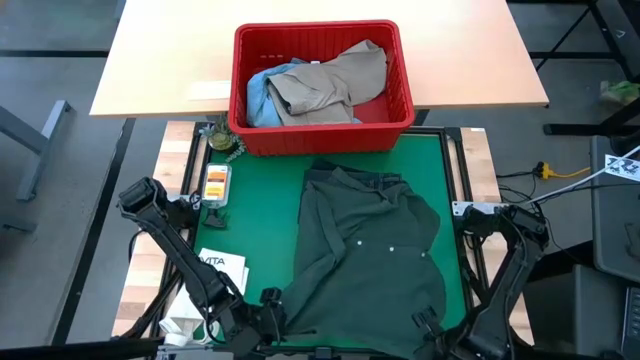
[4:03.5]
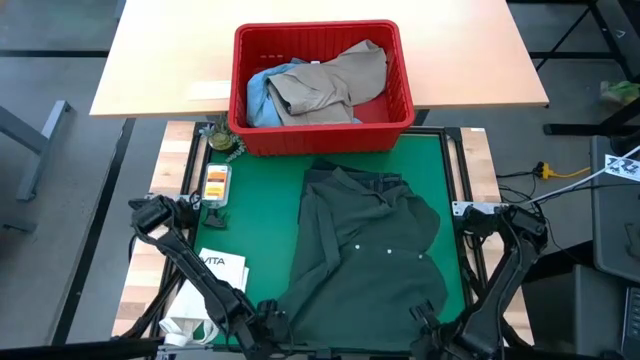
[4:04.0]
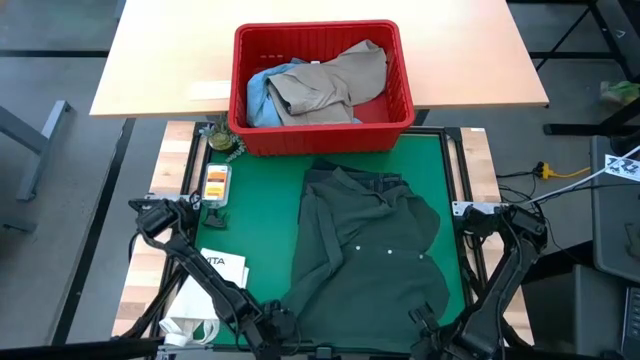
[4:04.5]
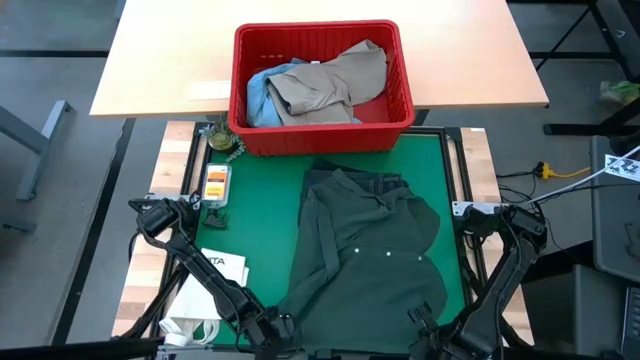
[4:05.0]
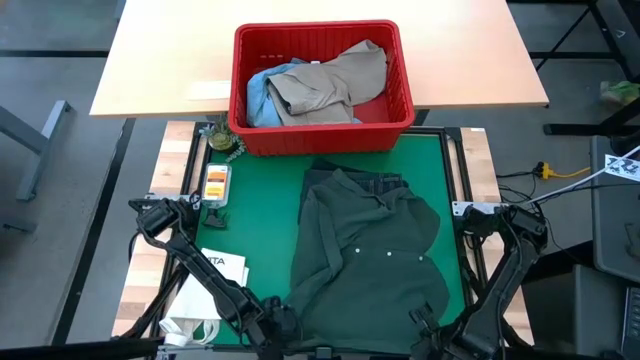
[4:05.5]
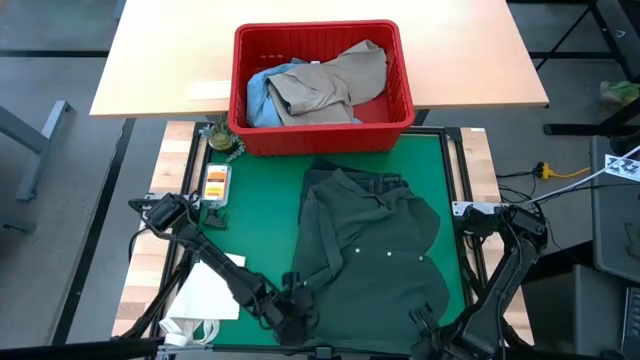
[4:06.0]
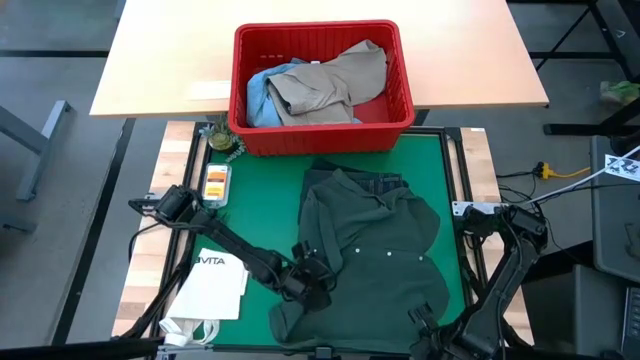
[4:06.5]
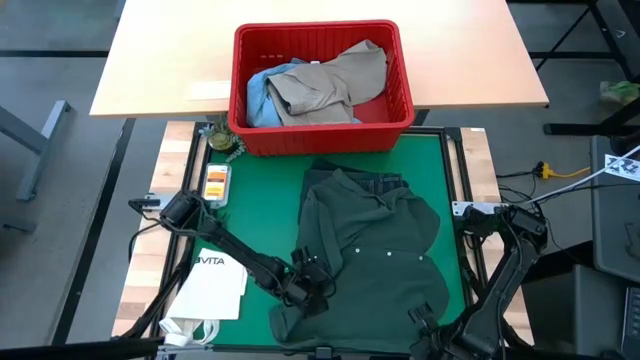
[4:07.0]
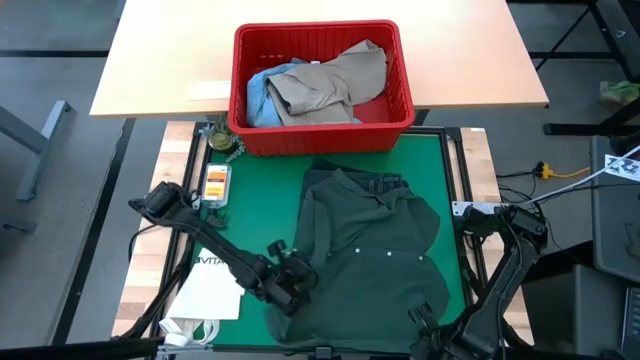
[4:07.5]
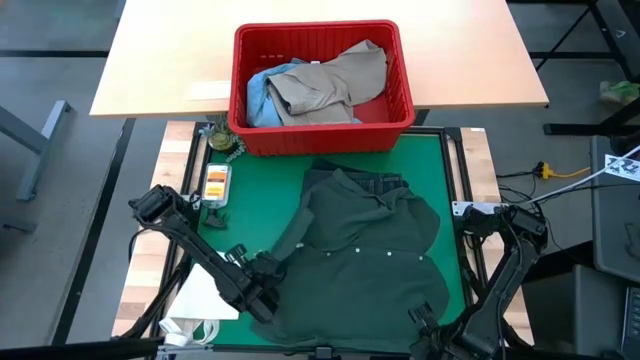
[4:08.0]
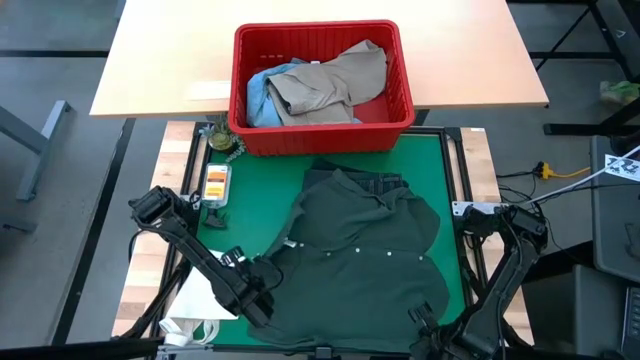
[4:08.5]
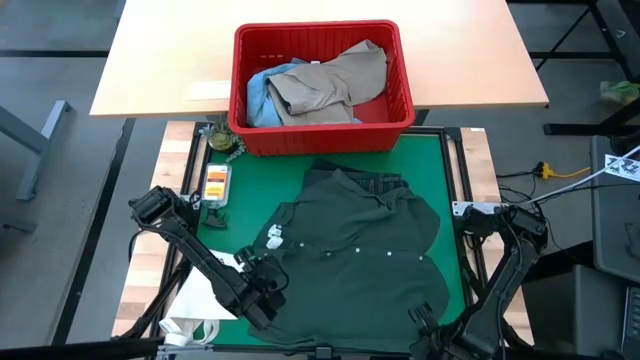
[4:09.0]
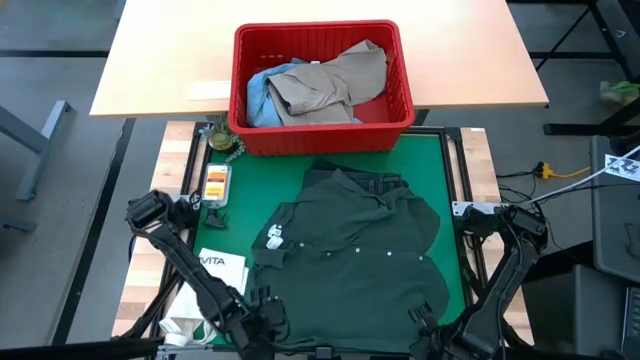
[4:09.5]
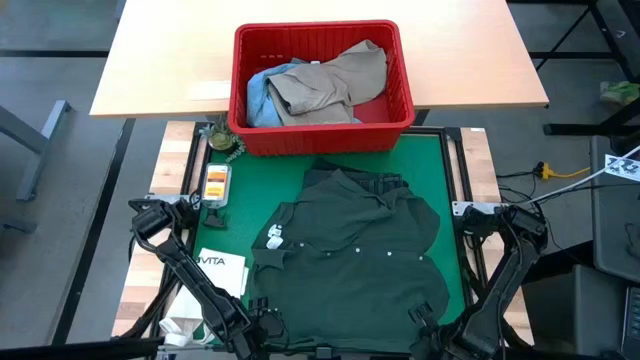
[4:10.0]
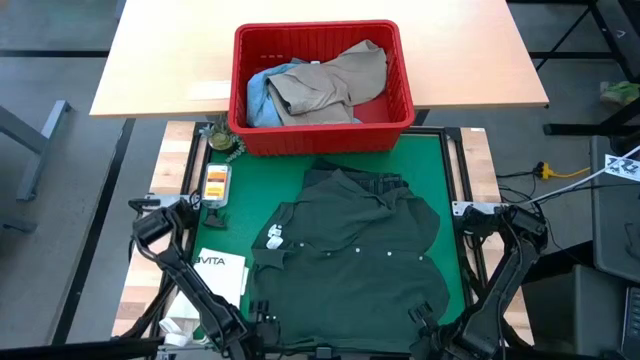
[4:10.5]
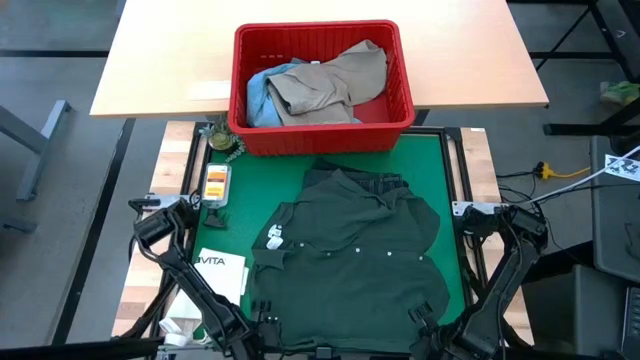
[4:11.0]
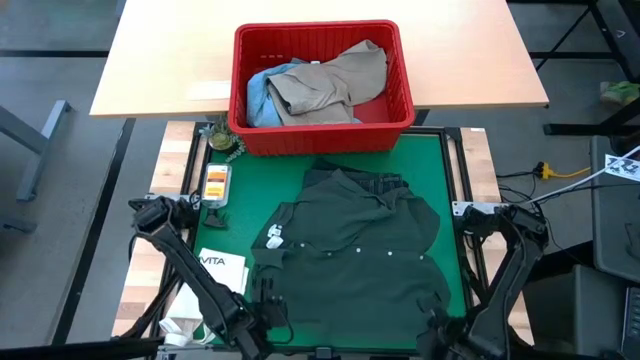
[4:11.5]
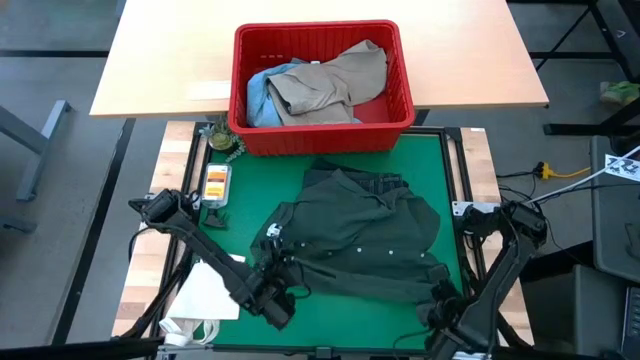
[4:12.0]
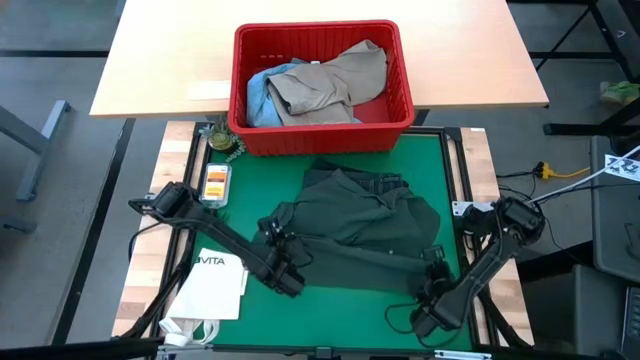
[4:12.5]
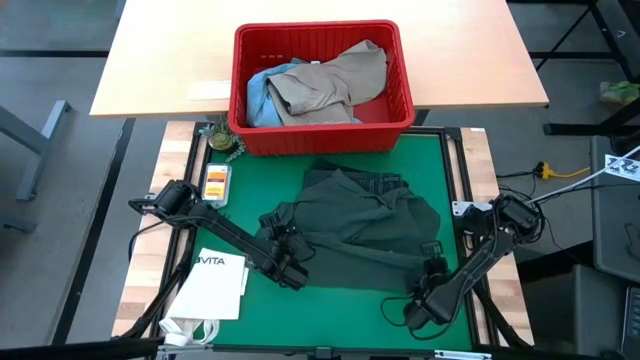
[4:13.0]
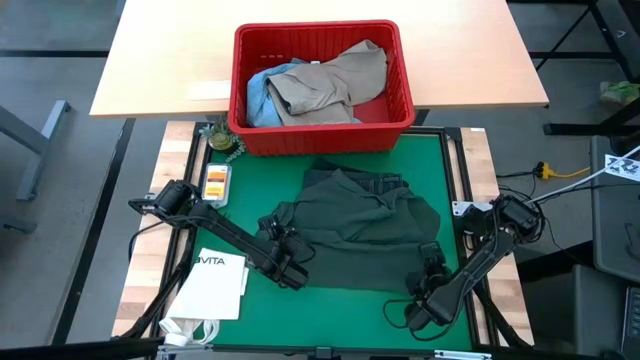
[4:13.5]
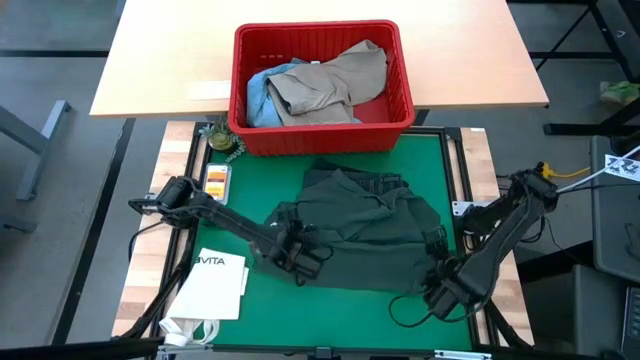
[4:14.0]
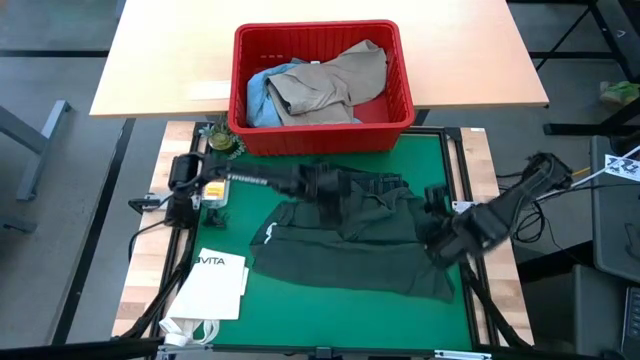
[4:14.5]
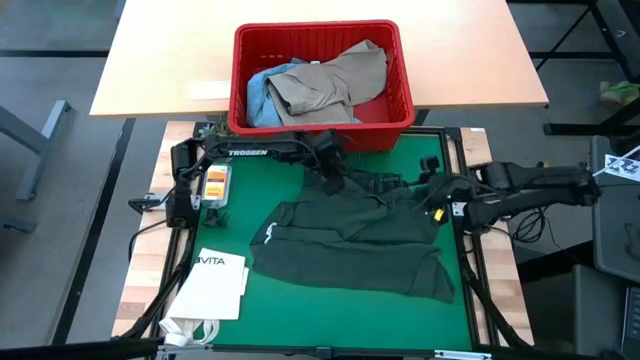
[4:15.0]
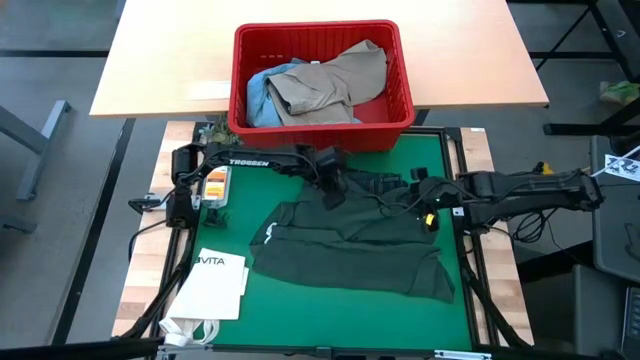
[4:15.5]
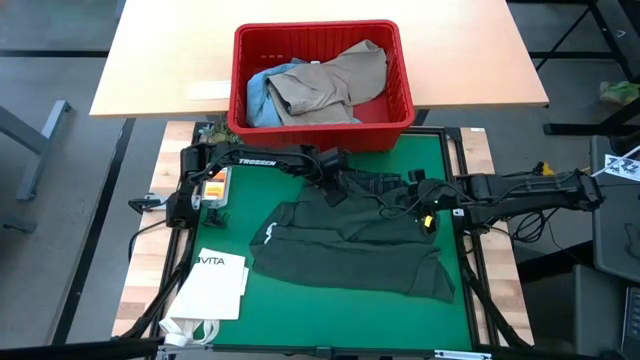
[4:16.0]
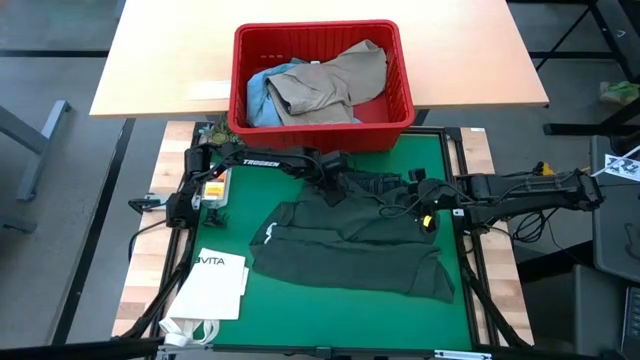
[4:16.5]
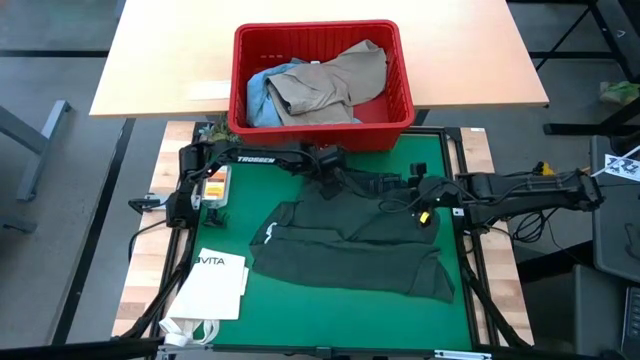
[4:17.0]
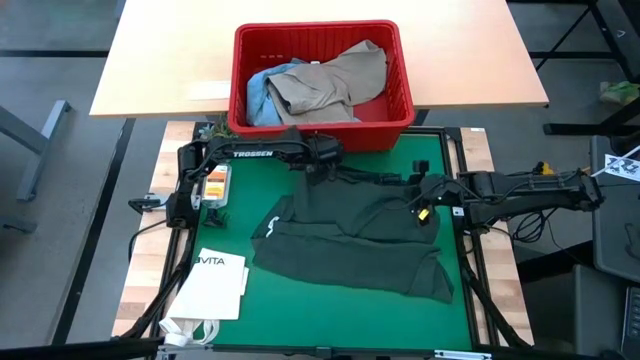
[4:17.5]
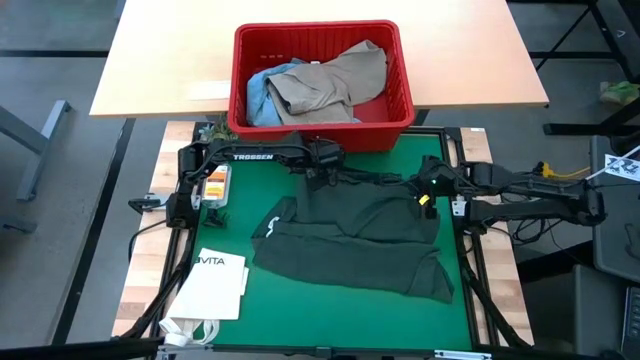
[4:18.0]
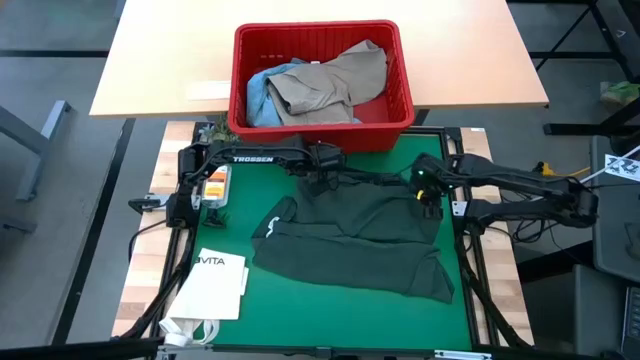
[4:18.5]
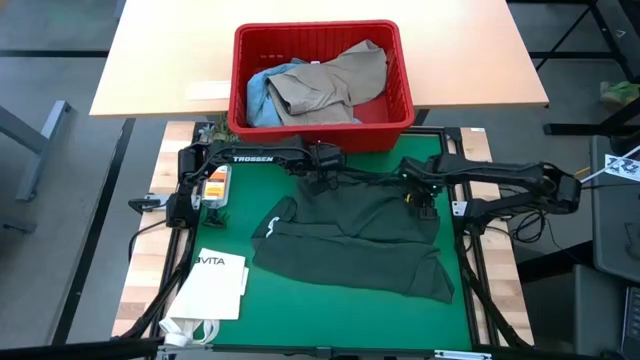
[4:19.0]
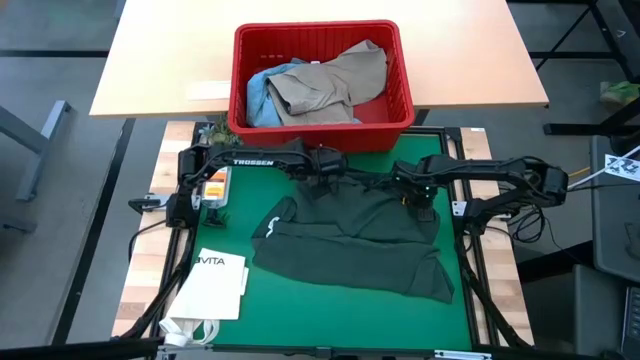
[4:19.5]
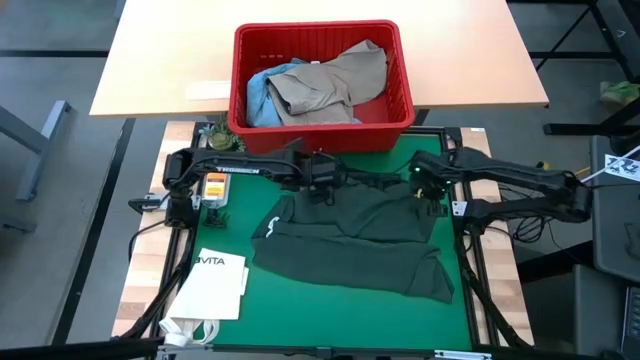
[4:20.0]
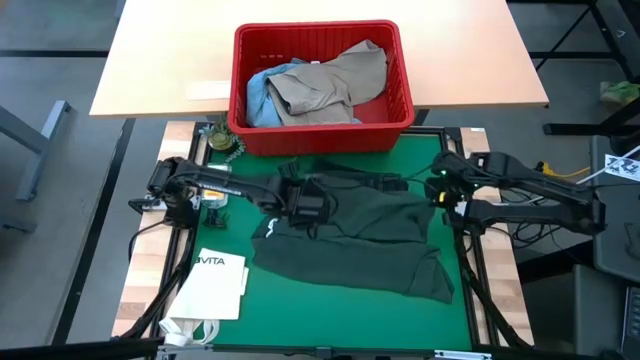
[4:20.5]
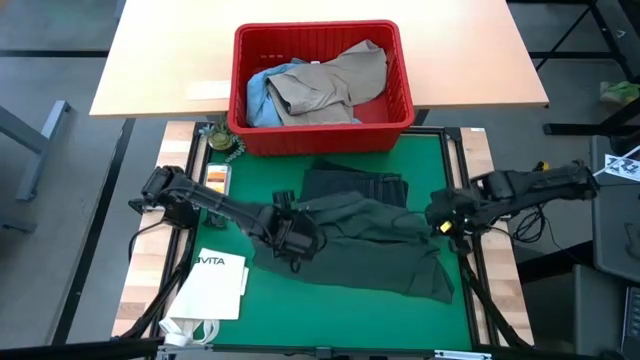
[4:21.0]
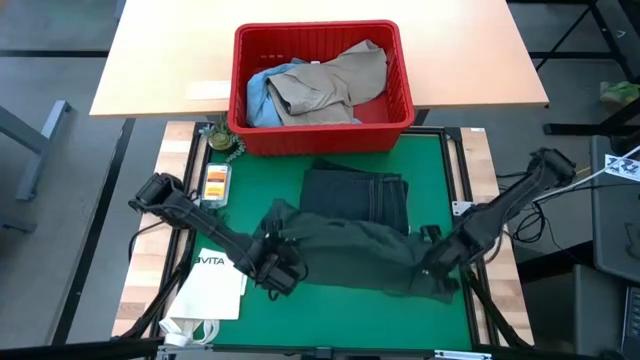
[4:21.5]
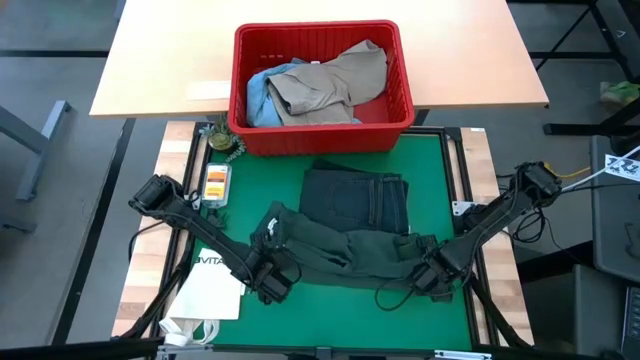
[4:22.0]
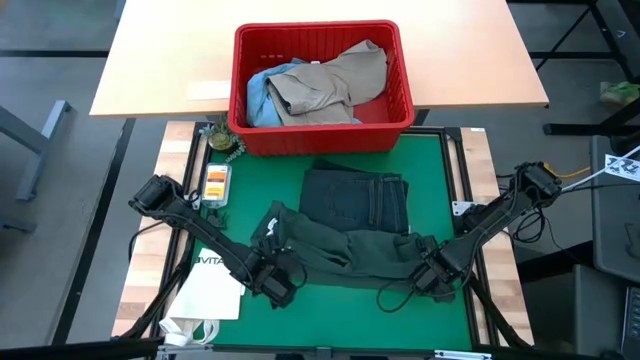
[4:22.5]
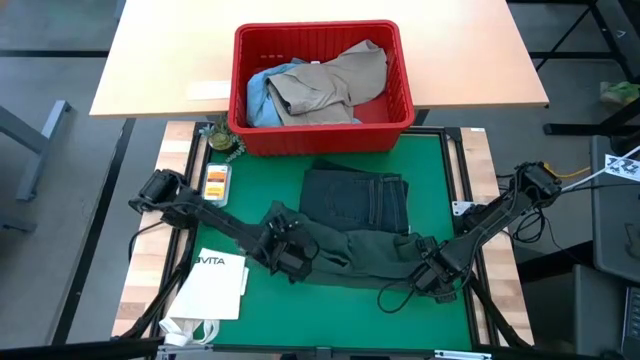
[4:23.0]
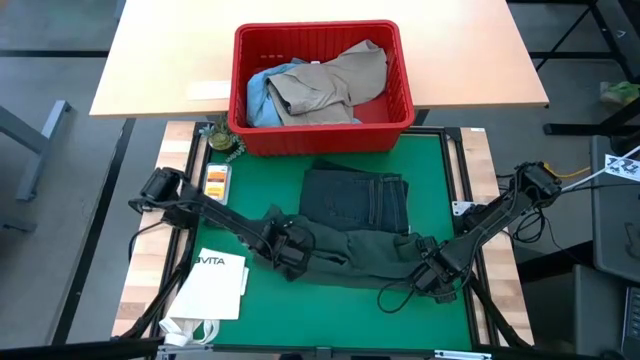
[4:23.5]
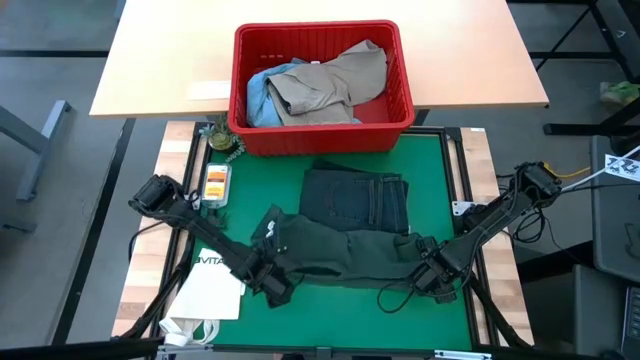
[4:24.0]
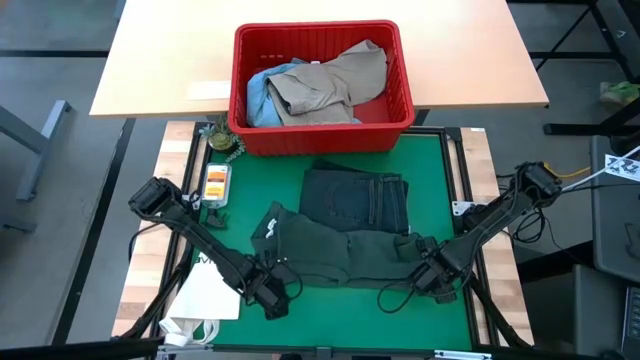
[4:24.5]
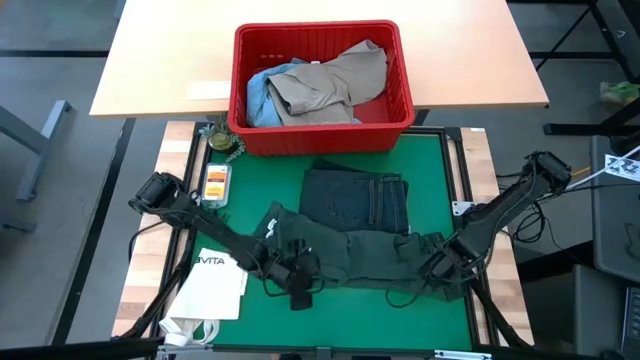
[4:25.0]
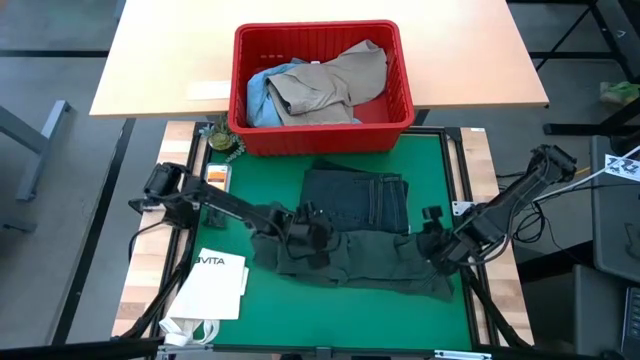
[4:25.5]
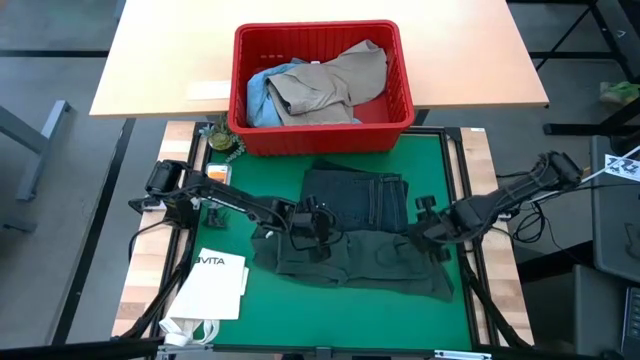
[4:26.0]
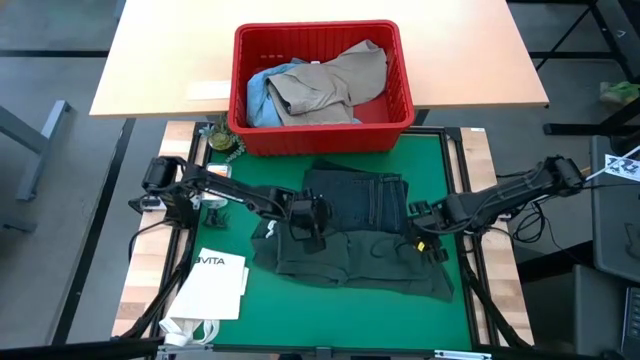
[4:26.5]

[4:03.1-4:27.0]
Task: Fold Laundry from Bin
Fold the green shirt
